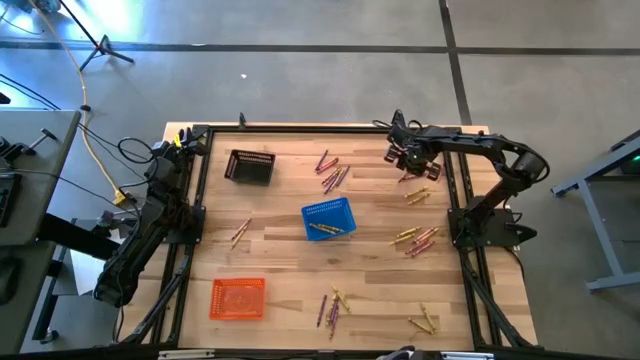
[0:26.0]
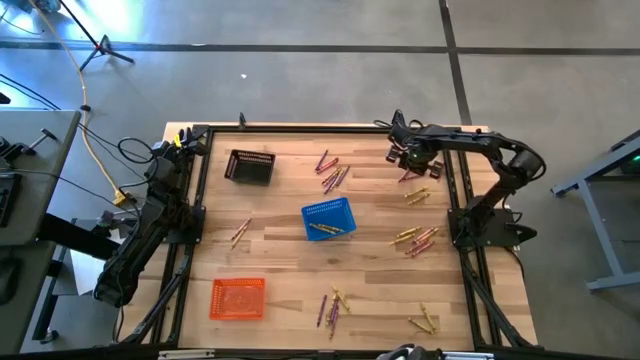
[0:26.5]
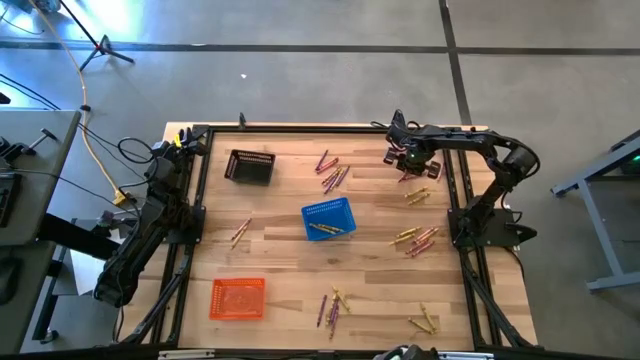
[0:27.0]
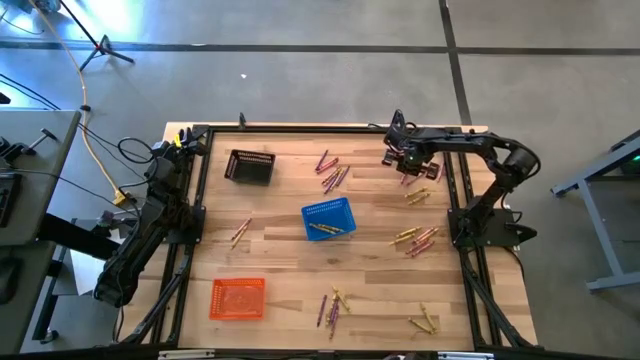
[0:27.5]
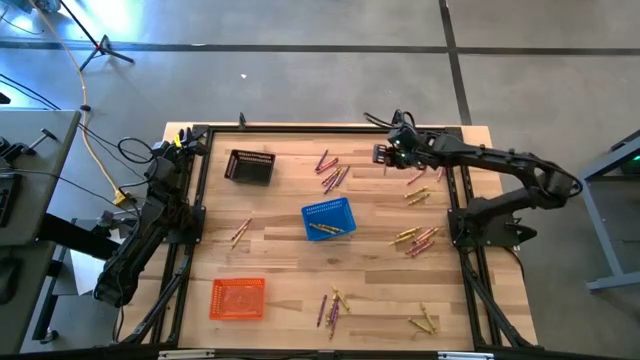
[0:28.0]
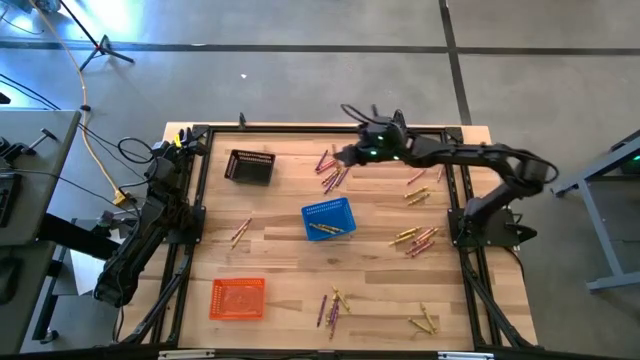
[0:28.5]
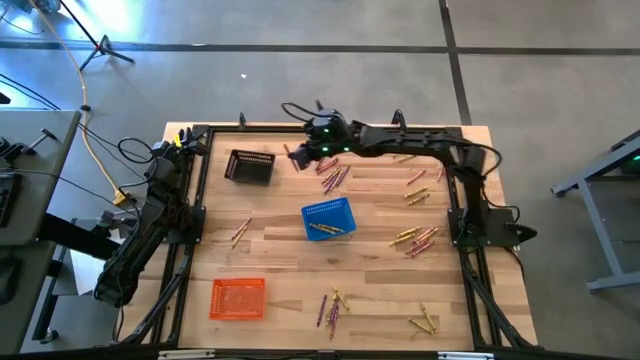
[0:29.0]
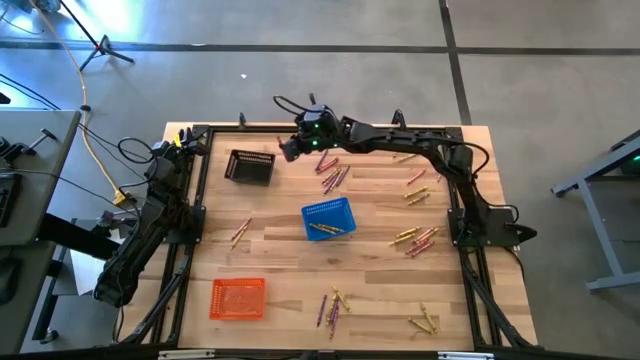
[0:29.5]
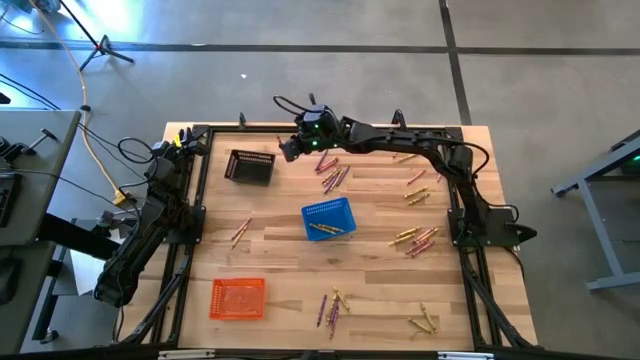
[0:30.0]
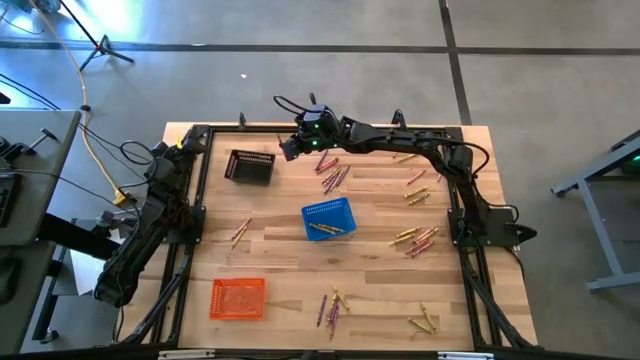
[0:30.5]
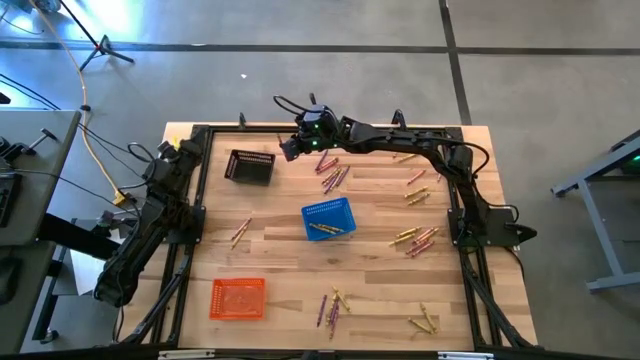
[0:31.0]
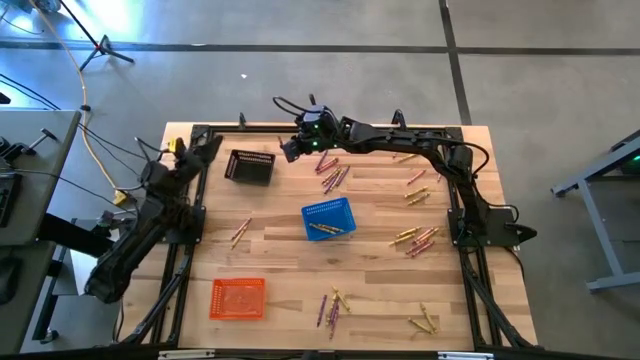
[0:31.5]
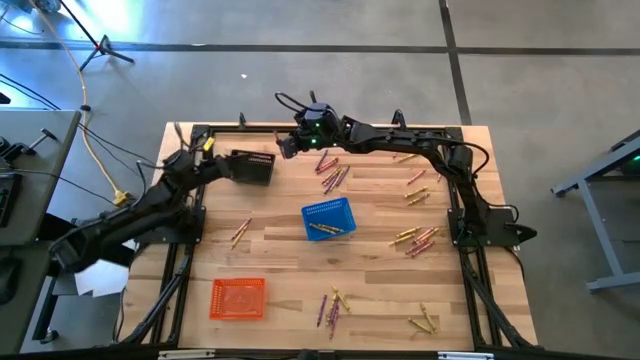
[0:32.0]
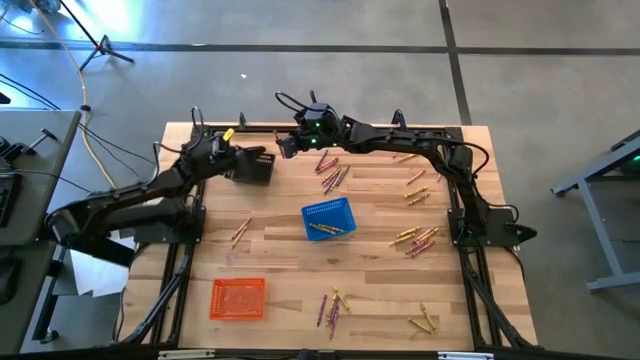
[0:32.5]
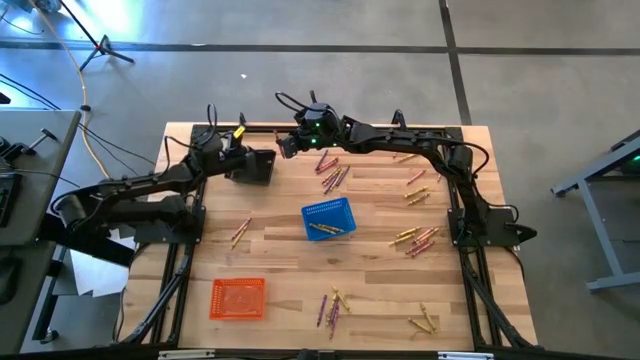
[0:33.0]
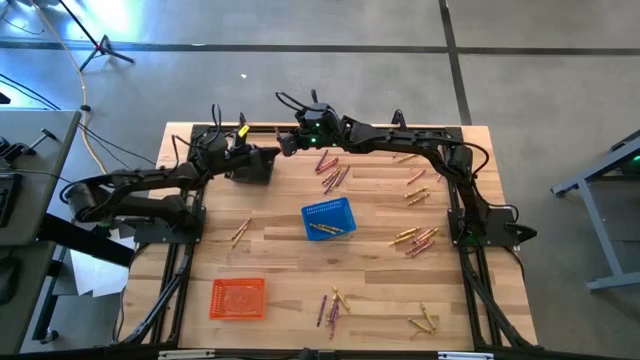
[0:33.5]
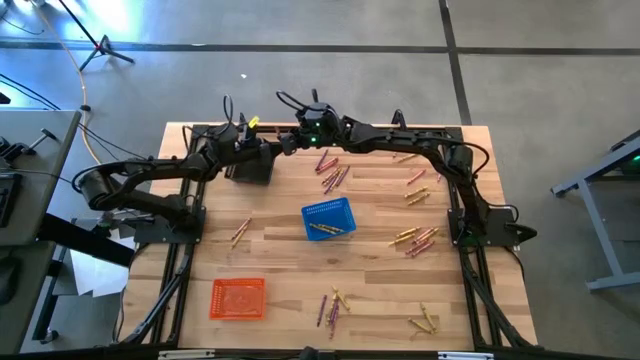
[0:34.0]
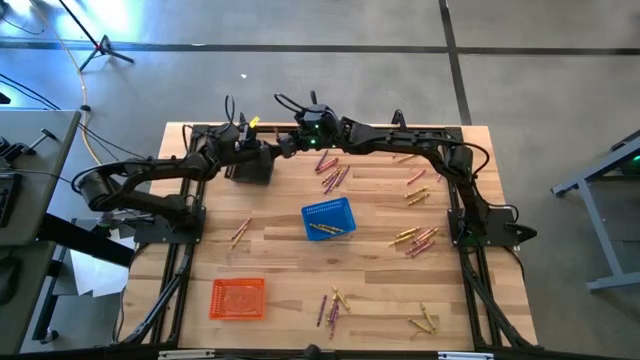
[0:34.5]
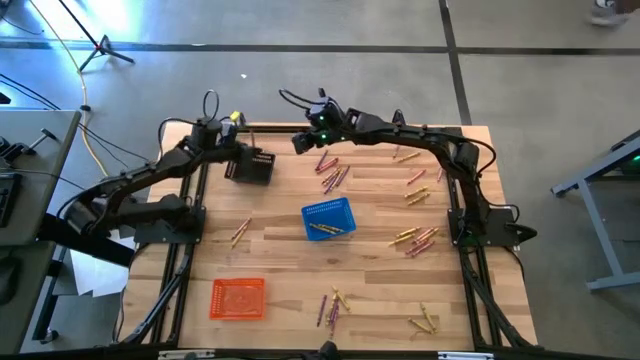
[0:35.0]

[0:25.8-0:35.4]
Task: Sort crayons
Put the red crayon into the black basket

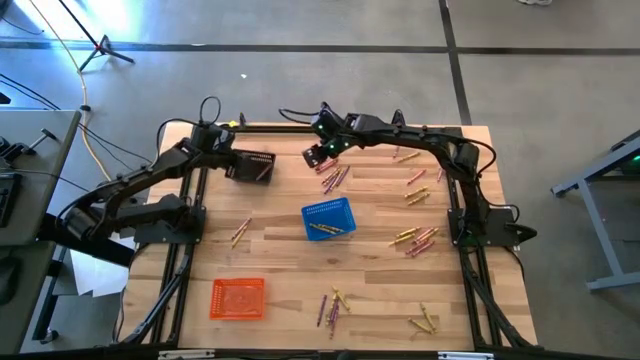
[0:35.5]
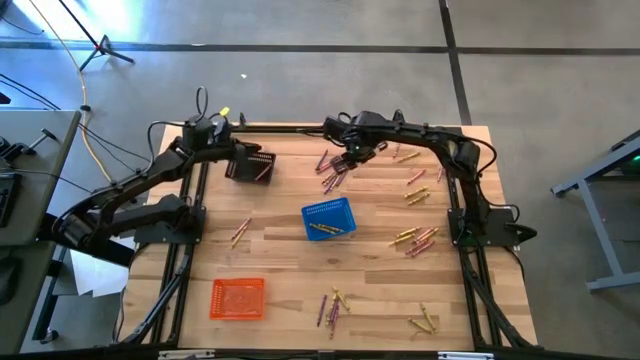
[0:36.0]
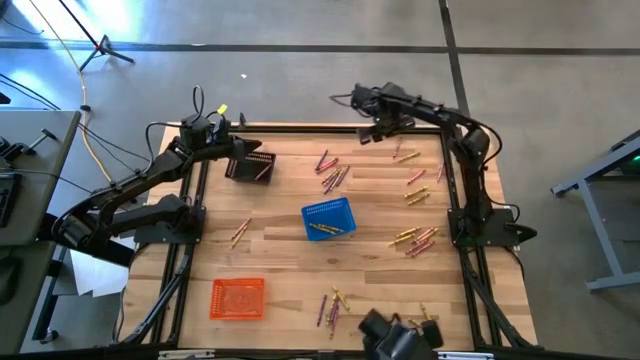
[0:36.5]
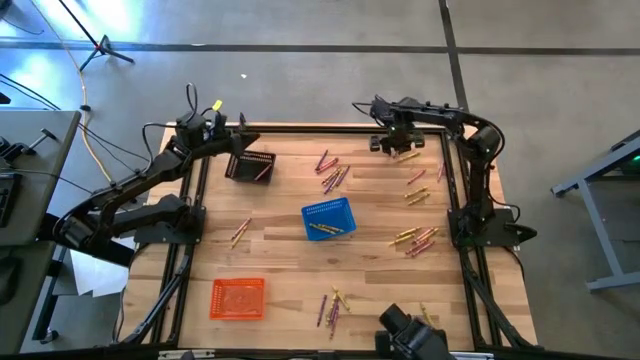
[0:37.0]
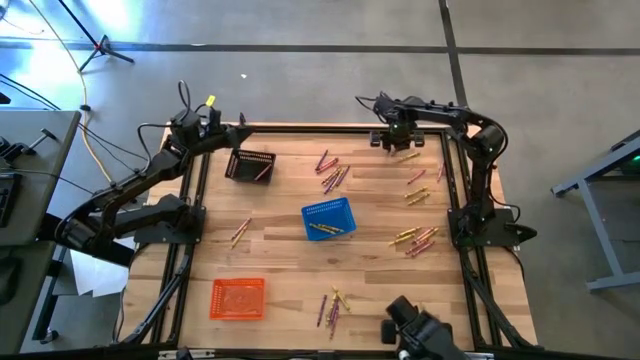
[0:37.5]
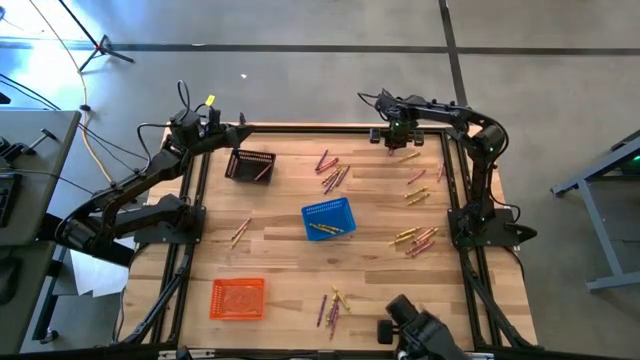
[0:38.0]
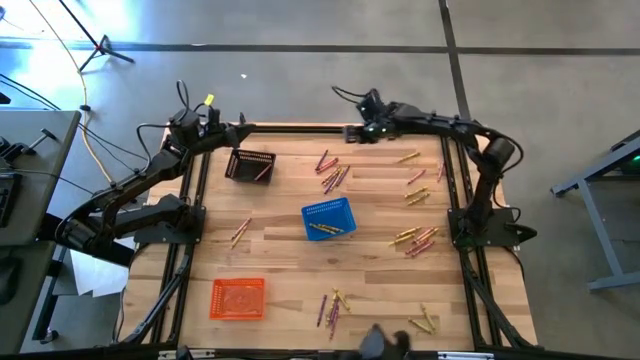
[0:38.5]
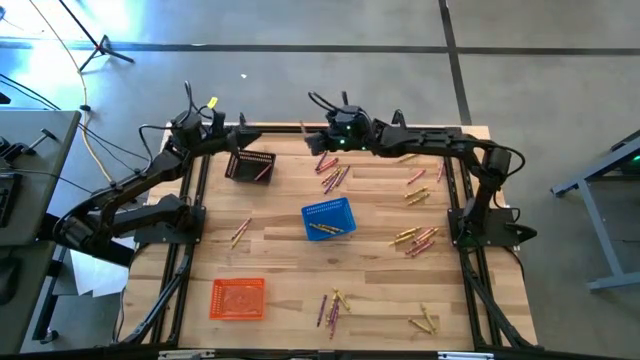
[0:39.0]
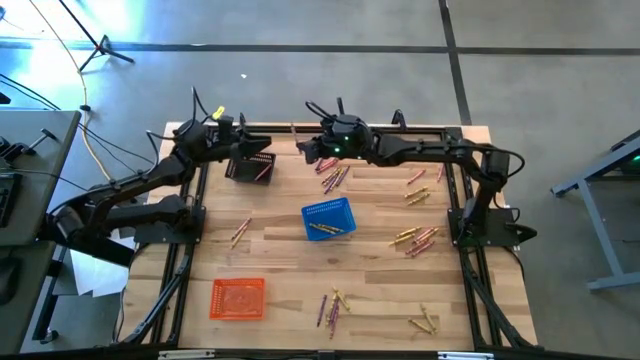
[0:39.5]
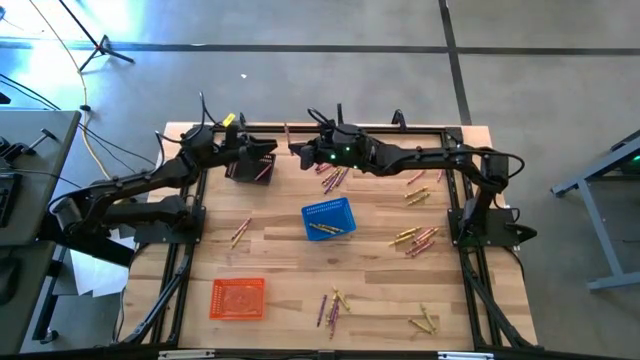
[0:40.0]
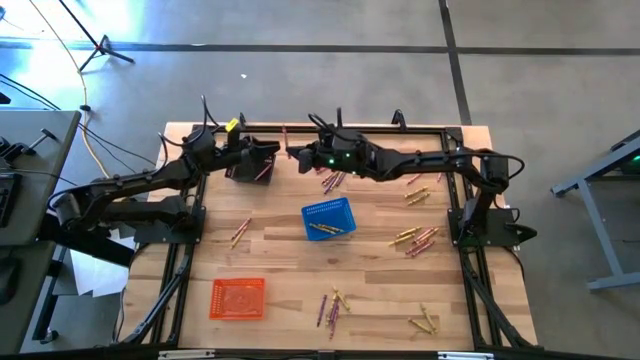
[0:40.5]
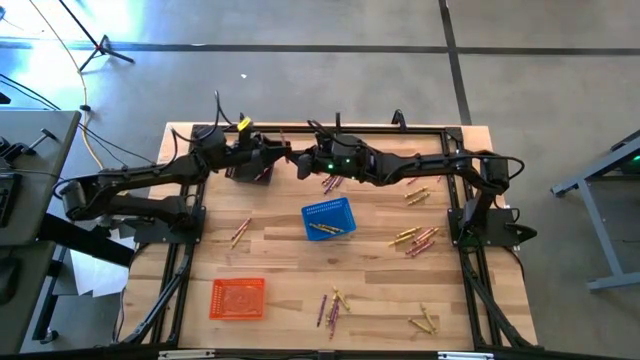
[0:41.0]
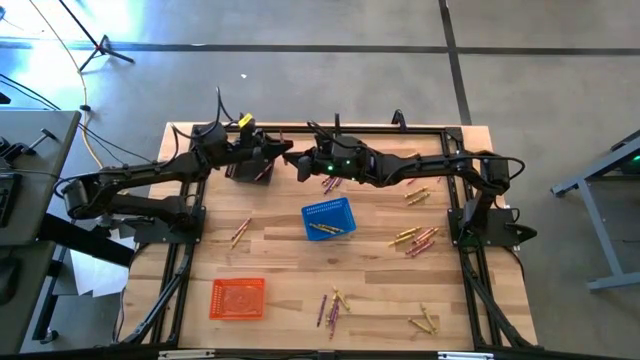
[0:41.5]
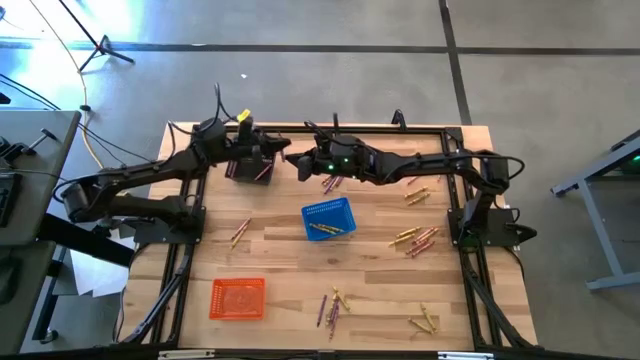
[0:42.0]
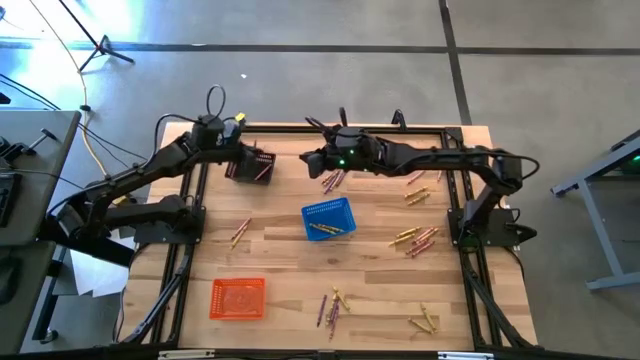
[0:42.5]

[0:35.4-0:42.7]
Put the red crayon into the black basket

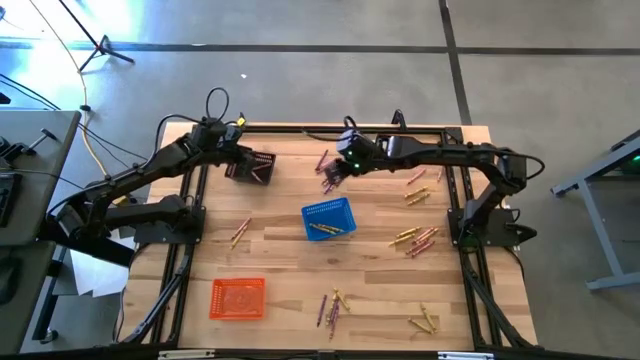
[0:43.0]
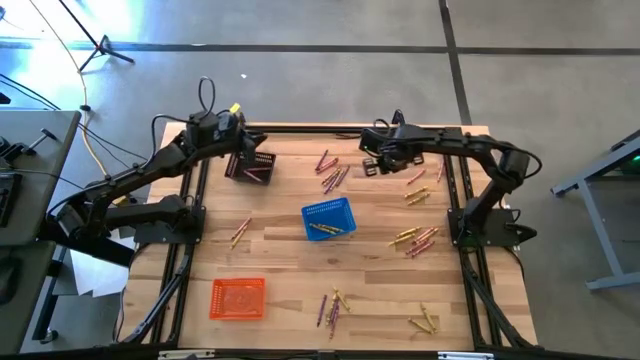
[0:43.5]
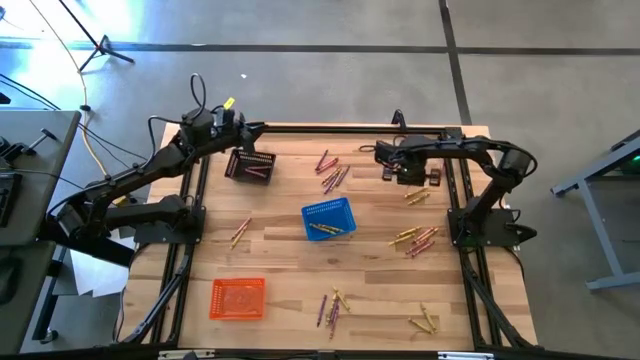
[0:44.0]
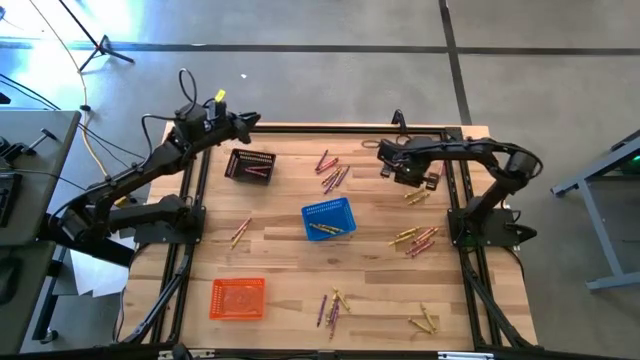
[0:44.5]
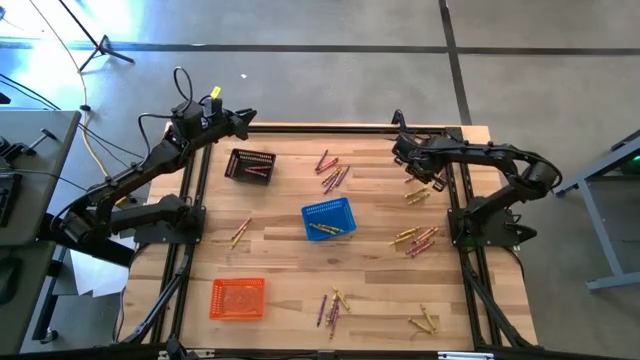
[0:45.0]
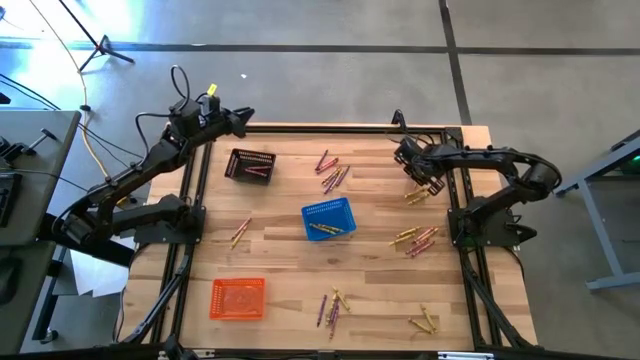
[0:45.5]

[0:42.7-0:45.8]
Put the red crayon into the black basket
